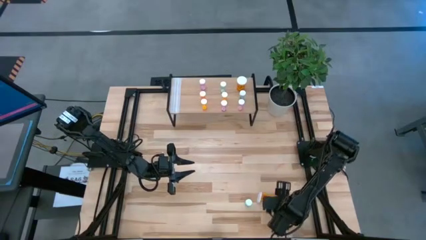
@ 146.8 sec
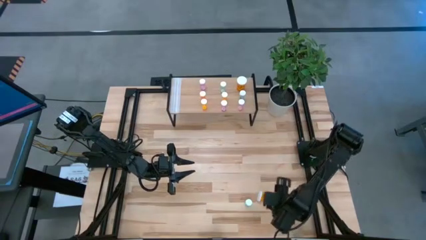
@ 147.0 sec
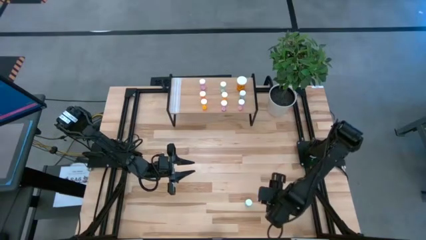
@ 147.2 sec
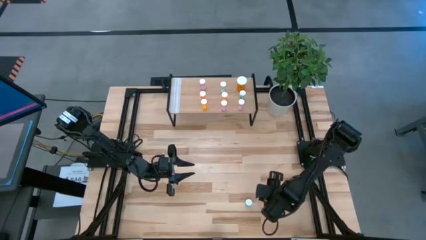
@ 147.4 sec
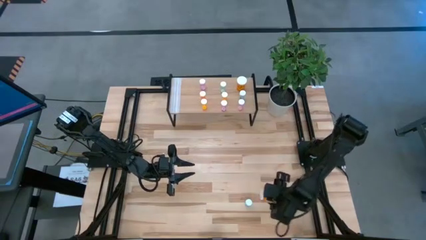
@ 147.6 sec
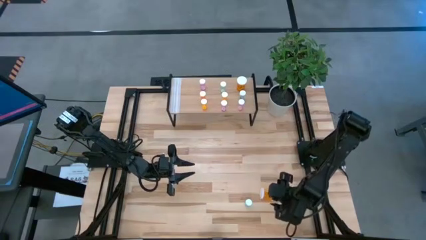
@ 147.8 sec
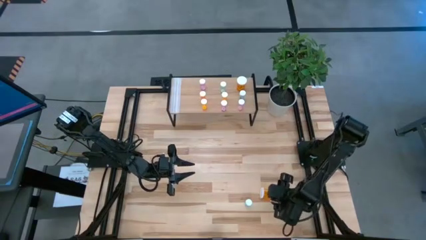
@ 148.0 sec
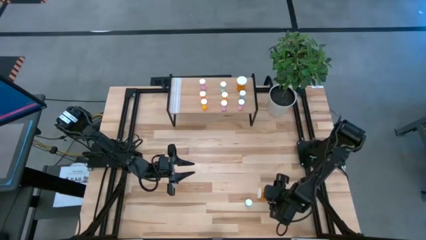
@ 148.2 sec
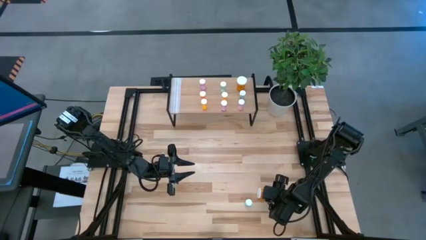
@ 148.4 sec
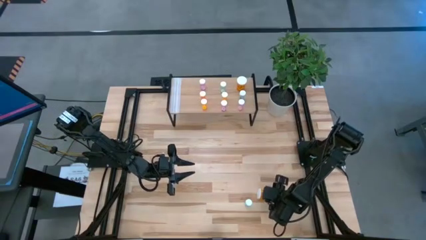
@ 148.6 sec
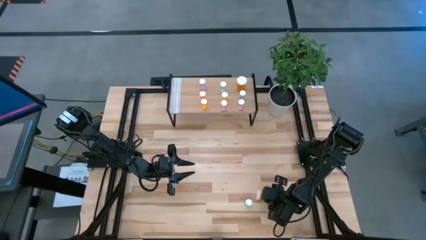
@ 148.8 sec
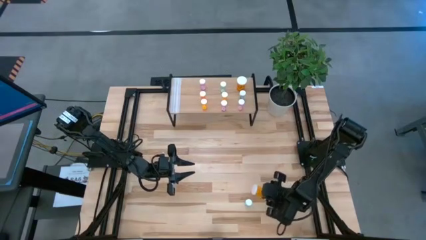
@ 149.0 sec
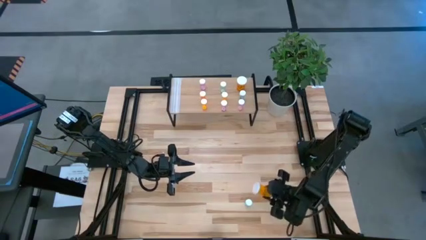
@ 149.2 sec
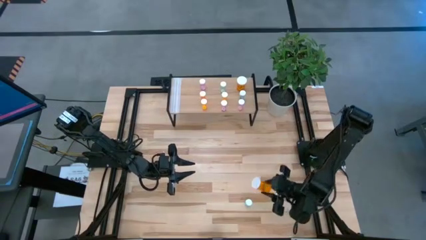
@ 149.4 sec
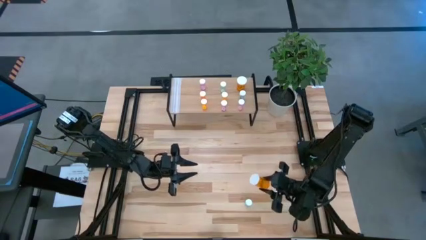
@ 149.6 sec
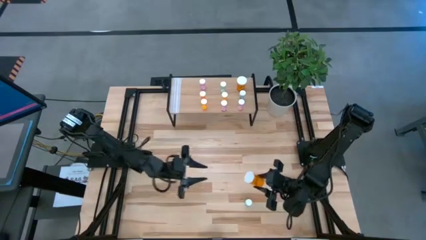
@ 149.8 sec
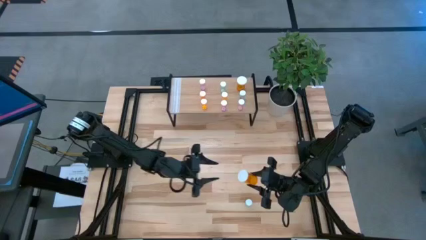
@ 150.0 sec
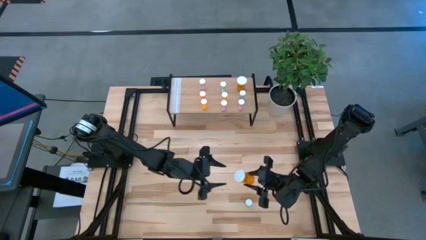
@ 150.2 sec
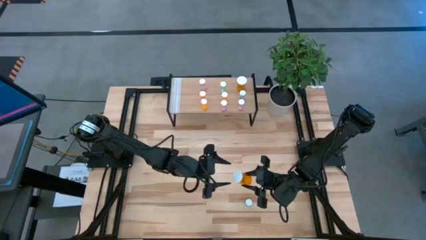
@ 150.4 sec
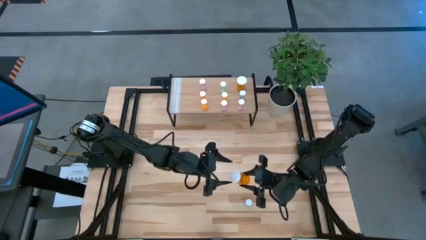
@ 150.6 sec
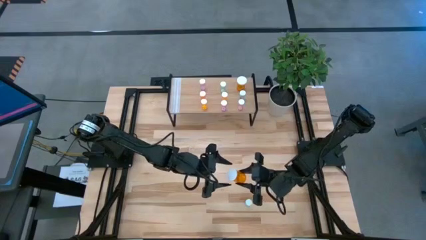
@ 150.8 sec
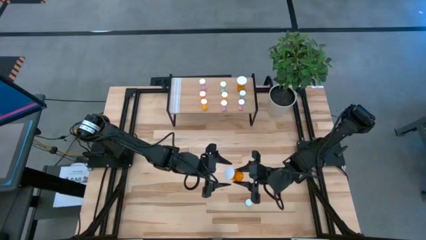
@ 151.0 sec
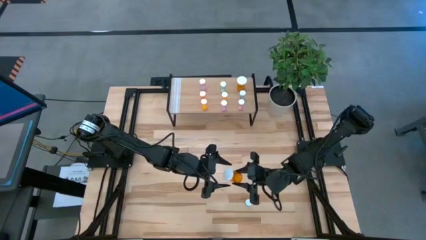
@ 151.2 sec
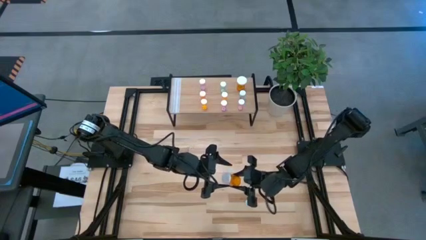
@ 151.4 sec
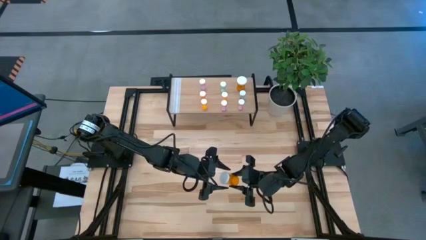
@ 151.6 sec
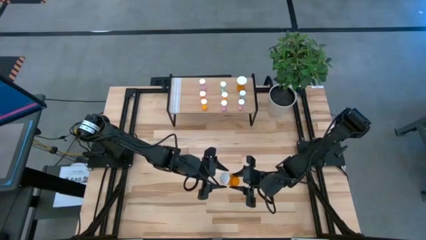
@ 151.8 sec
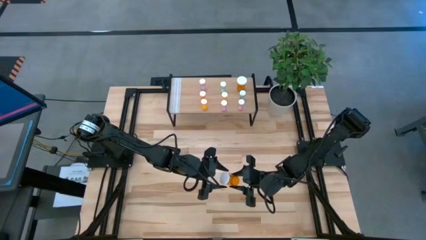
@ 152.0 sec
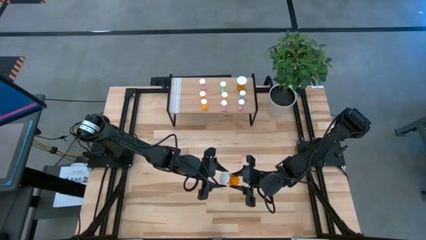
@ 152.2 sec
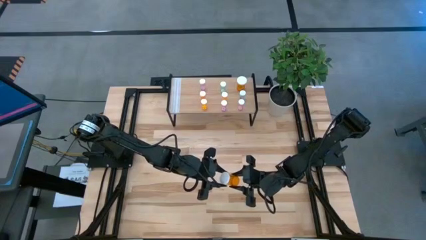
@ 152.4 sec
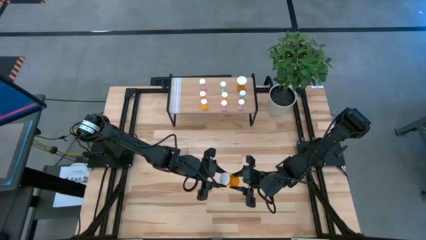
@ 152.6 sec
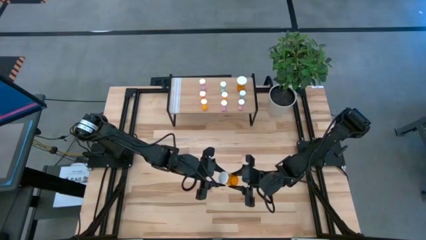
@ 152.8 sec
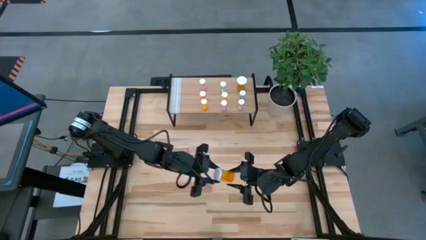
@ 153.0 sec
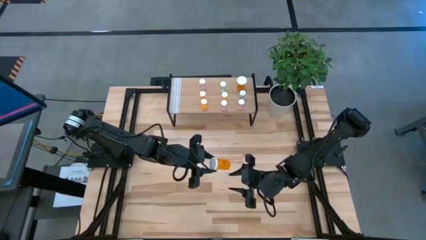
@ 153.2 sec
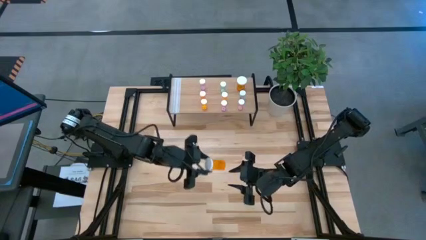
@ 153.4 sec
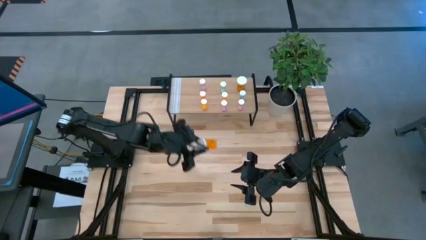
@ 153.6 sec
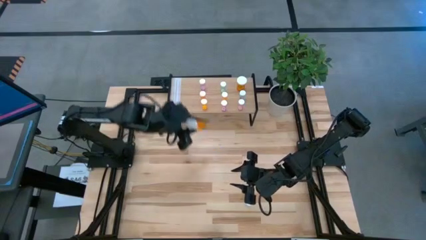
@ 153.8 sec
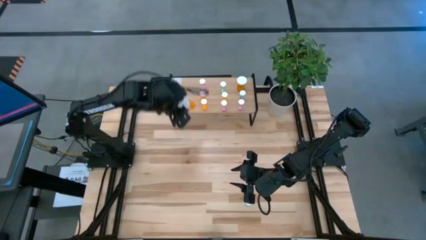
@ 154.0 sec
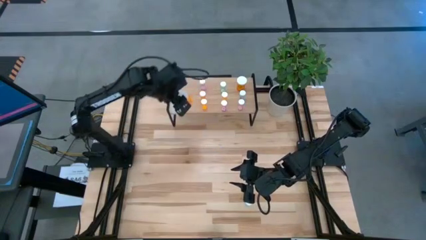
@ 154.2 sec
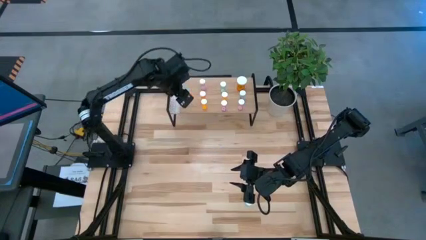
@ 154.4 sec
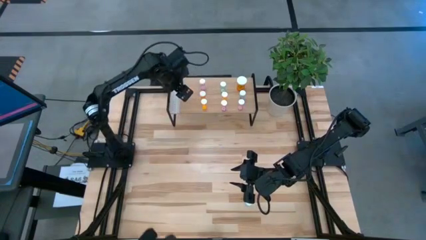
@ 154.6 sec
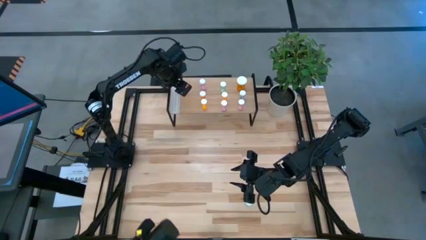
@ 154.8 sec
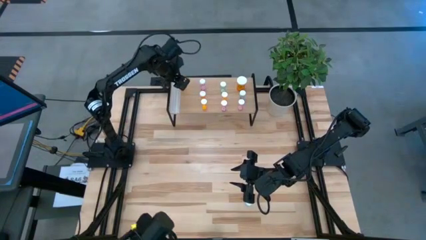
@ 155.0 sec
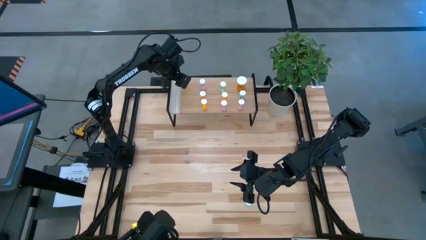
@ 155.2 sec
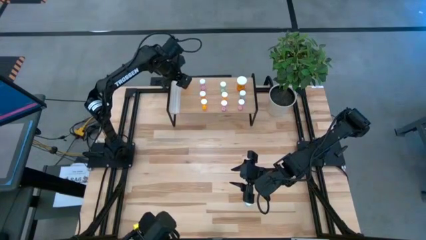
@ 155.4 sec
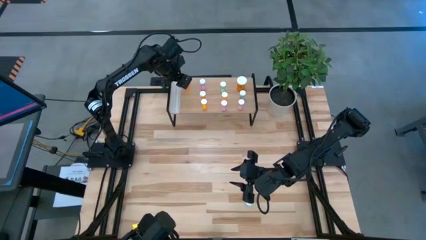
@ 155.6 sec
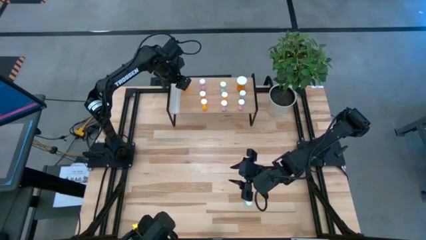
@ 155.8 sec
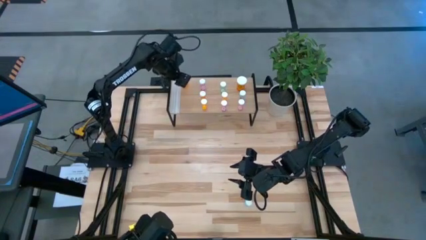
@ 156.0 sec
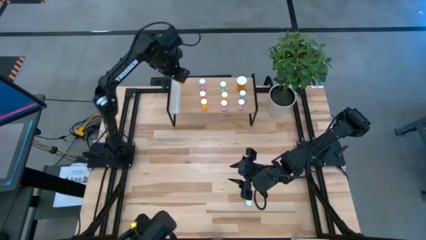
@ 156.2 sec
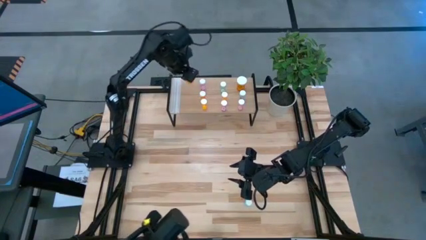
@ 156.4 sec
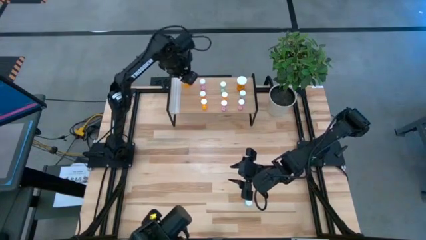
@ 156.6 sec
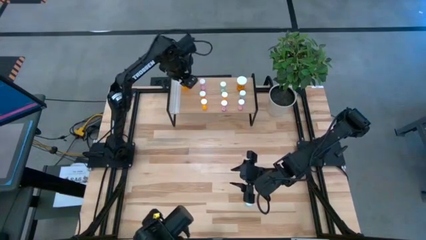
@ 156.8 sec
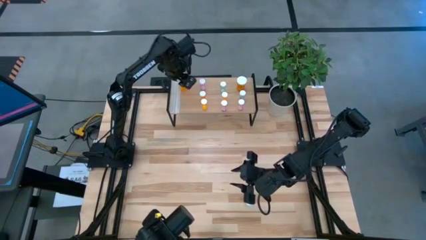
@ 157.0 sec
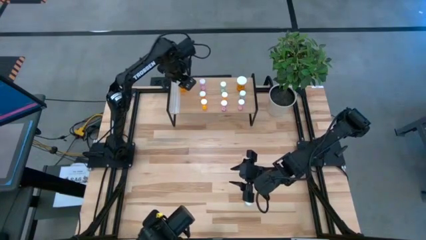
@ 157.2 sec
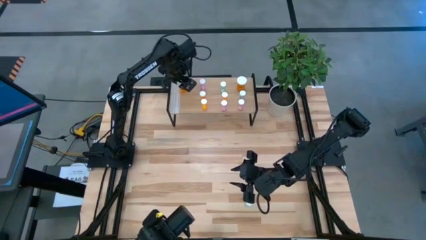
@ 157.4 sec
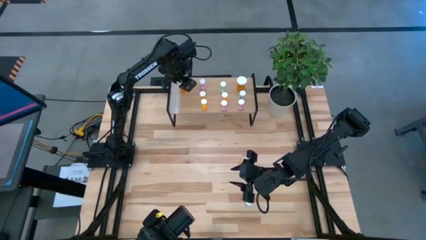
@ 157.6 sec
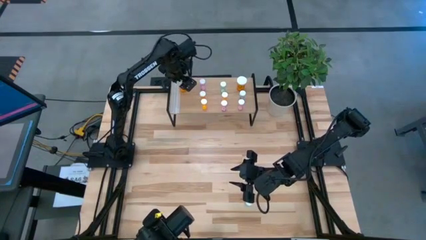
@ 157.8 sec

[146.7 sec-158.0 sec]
Task: Pick and place medicine bottles onto shelf by color
Put the large orange pill bottle on the shelf

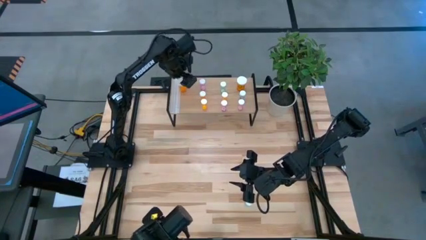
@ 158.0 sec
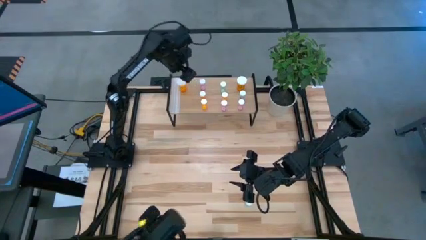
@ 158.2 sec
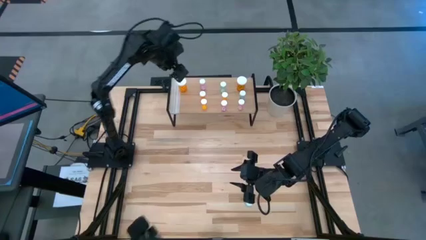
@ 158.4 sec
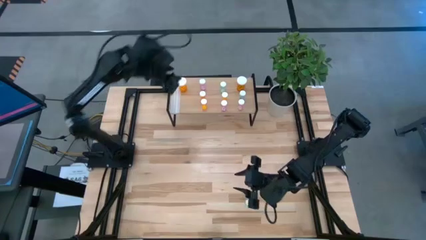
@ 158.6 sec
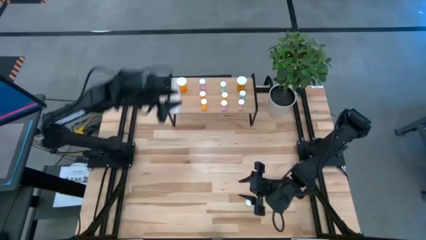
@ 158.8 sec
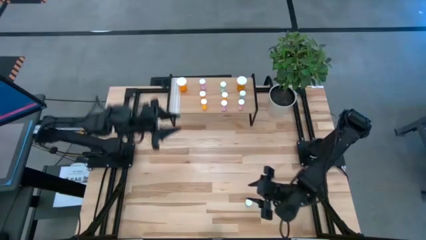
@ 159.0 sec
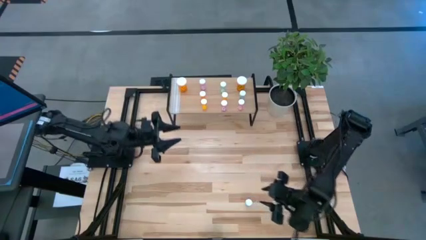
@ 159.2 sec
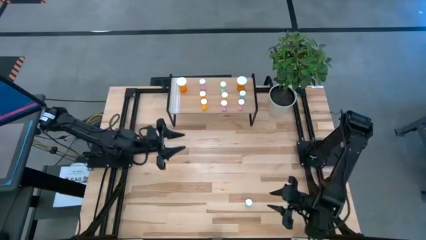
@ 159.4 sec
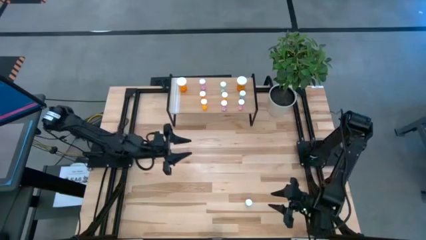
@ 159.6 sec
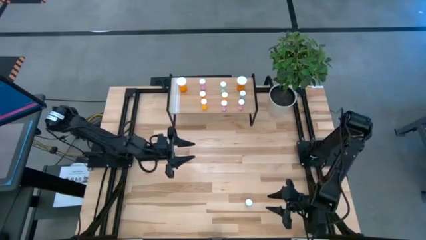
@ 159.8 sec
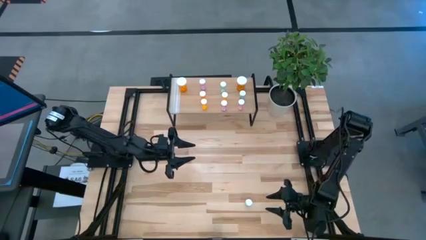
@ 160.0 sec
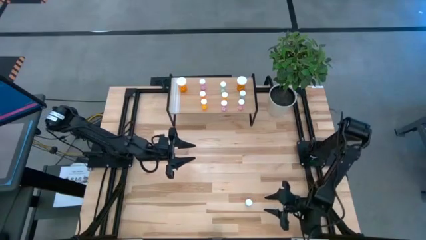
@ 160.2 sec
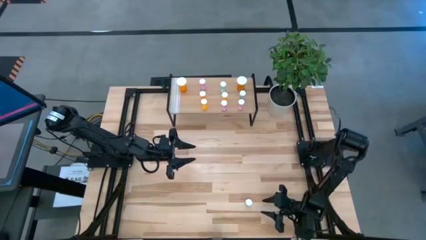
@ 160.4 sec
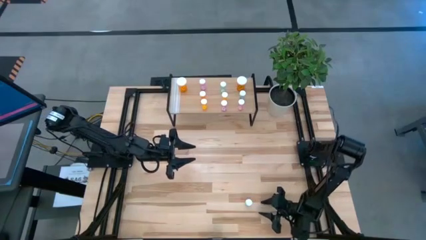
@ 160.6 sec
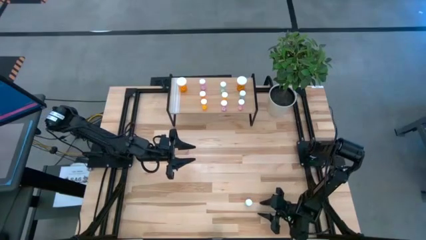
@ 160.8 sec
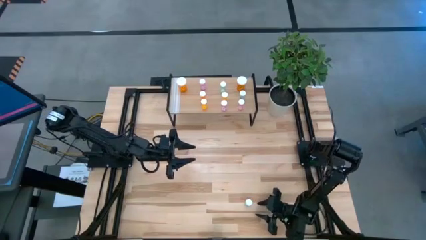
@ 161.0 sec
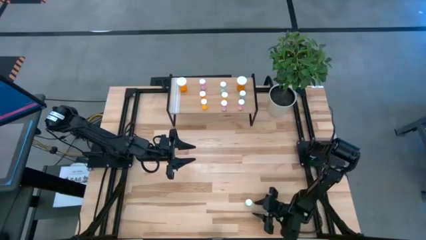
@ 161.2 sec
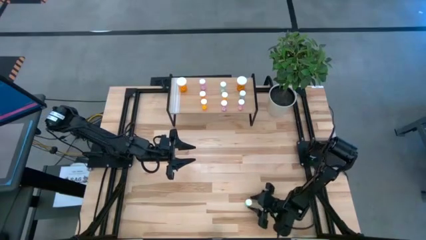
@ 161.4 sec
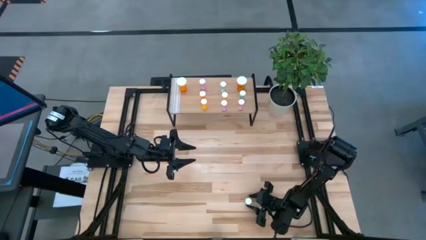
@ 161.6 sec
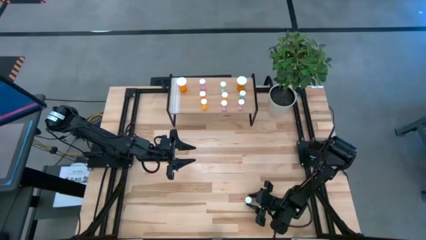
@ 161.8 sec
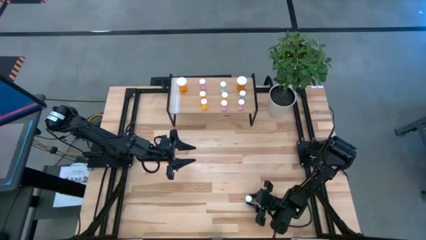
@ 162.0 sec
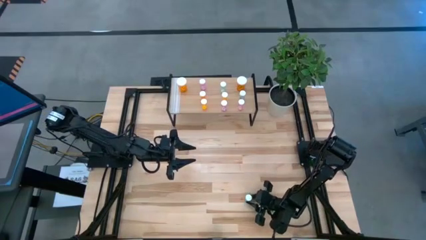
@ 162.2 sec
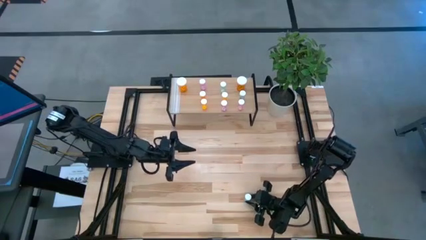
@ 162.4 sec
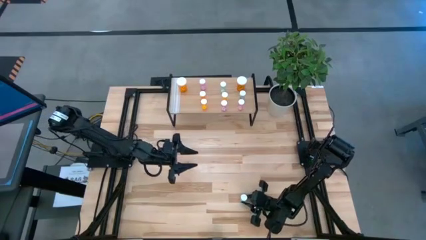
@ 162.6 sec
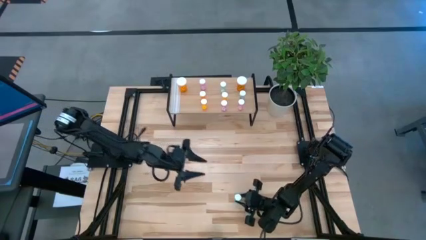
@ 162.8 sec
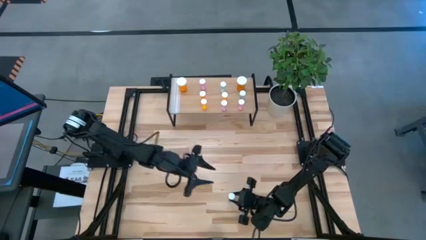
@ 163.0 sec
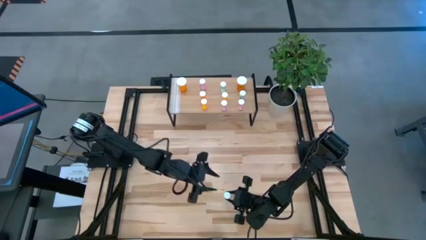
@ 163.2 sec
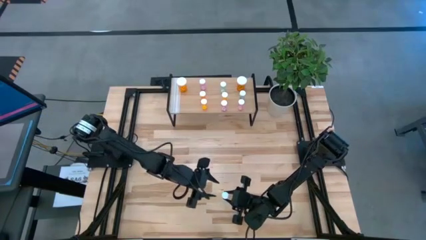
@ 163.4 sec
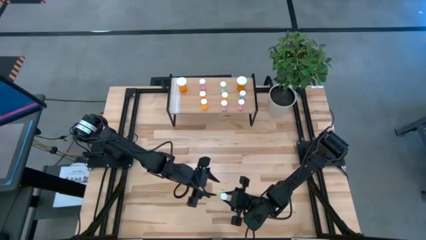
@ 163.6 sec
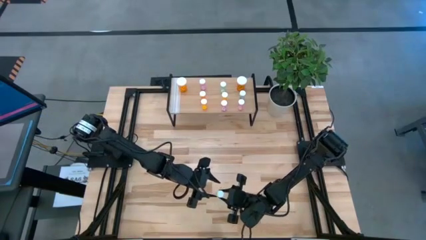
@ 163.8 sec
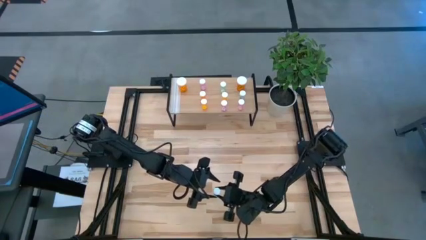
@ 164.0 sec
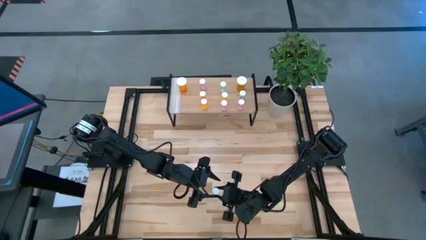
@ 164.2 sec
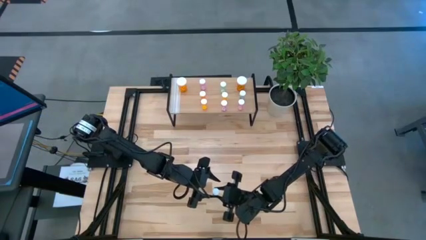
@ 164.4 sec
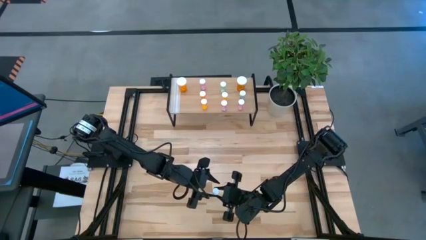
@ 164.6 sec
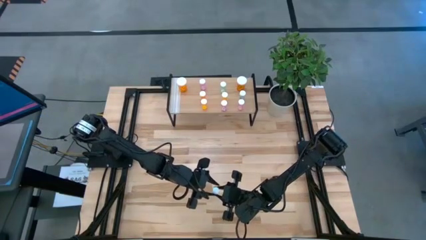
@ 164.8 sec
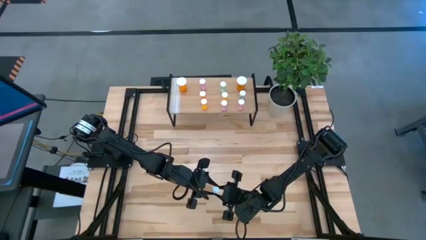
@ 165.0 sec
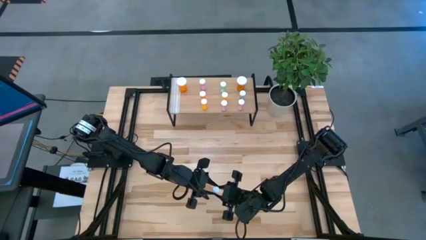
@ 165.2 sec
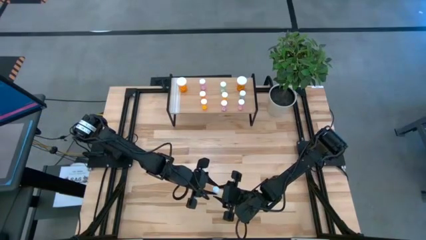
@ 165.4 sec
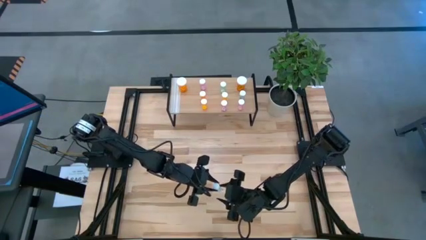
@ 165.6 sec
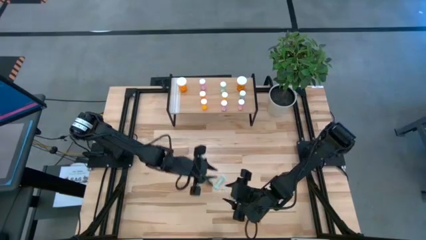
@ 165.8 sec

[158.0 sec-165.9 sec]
Put the small blue pill bottle on the shelf
